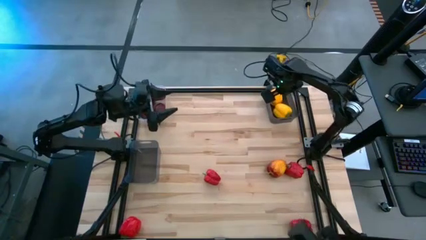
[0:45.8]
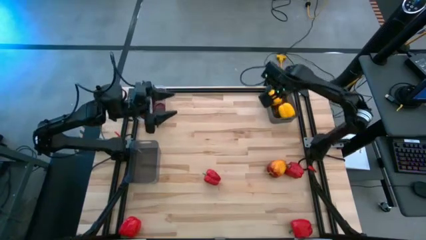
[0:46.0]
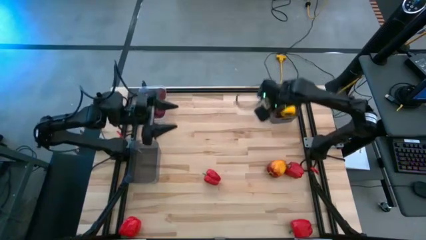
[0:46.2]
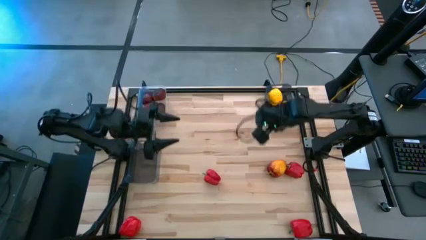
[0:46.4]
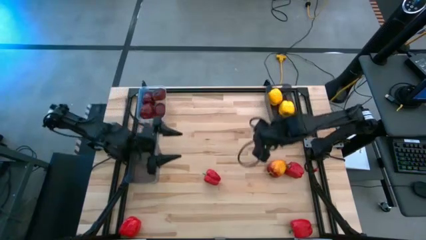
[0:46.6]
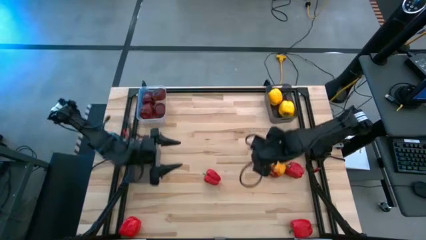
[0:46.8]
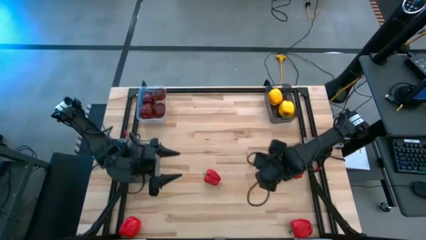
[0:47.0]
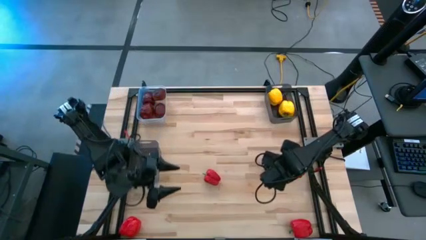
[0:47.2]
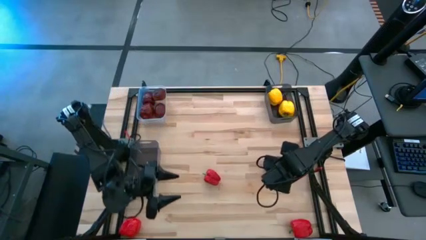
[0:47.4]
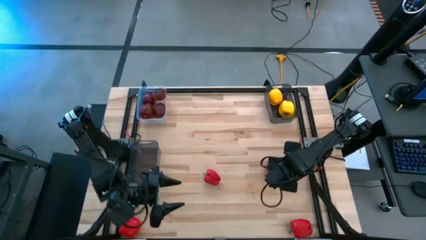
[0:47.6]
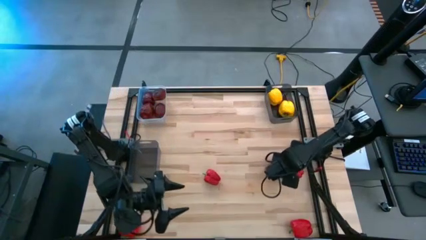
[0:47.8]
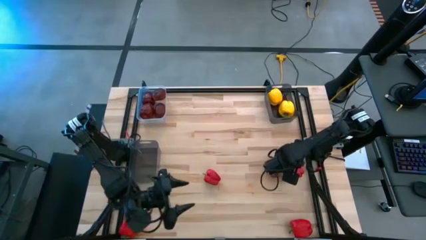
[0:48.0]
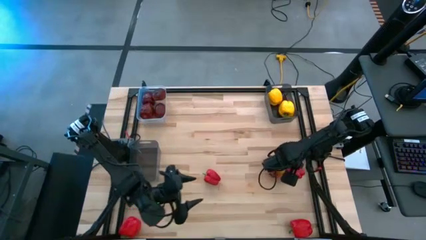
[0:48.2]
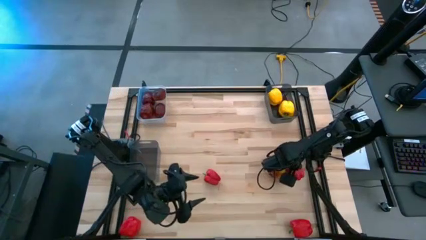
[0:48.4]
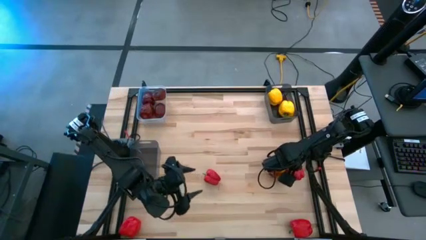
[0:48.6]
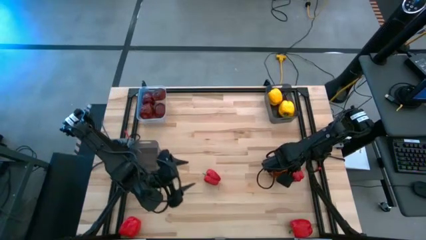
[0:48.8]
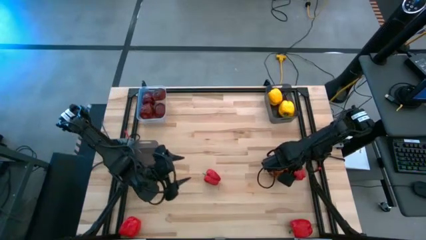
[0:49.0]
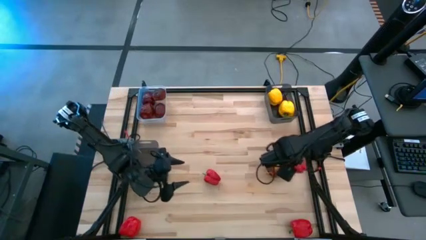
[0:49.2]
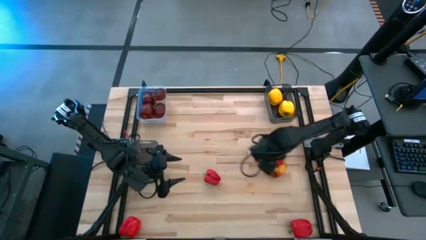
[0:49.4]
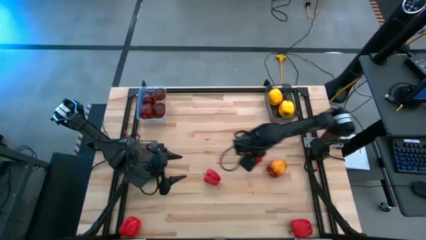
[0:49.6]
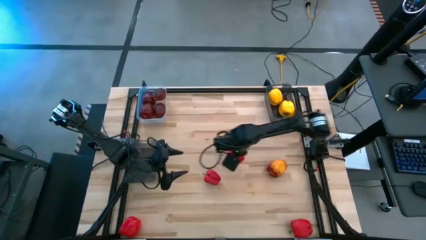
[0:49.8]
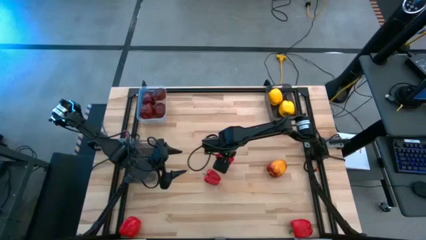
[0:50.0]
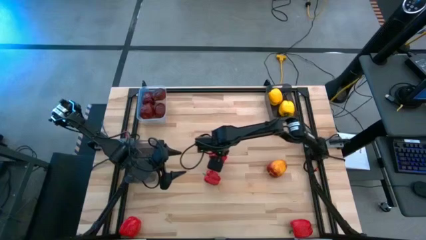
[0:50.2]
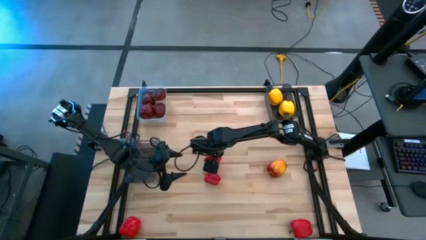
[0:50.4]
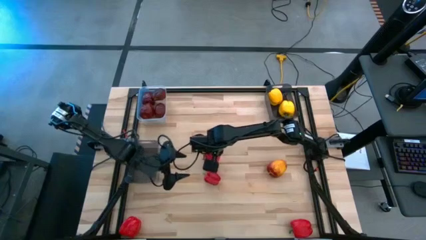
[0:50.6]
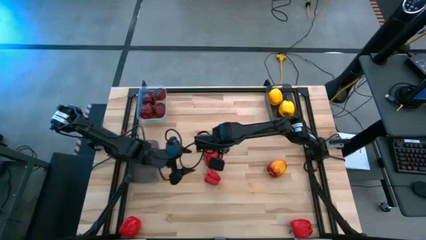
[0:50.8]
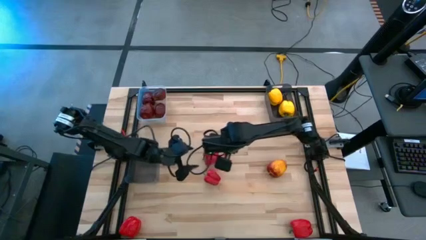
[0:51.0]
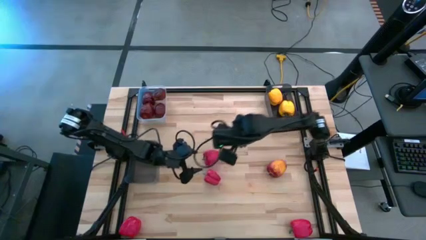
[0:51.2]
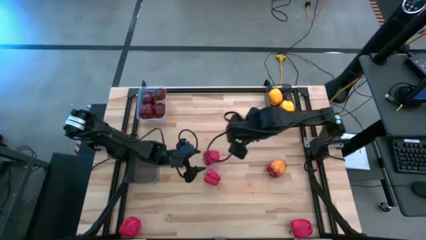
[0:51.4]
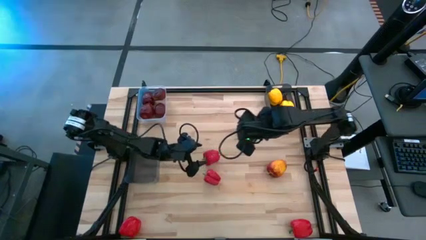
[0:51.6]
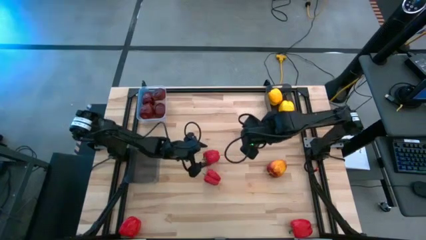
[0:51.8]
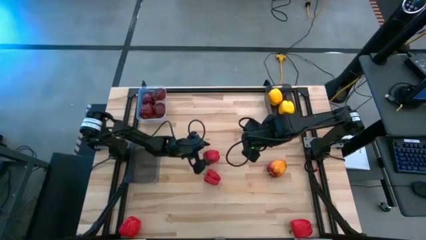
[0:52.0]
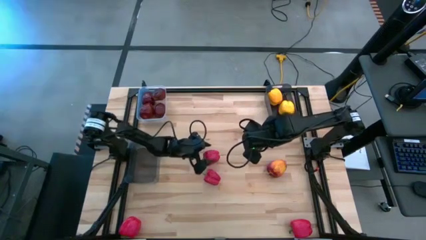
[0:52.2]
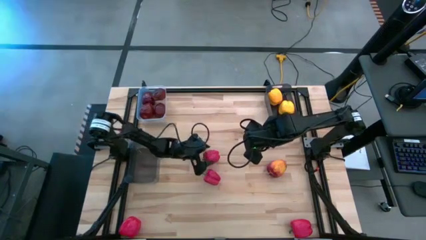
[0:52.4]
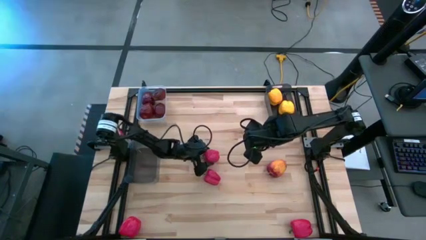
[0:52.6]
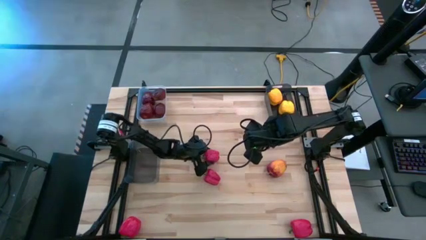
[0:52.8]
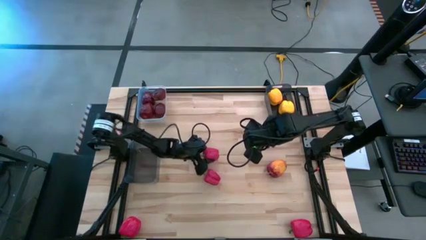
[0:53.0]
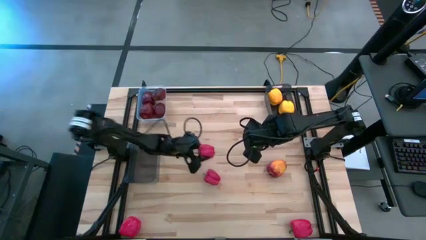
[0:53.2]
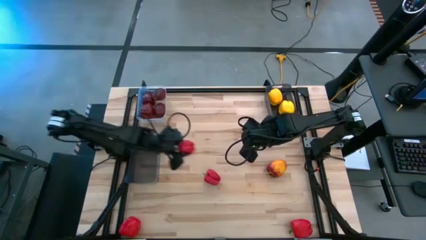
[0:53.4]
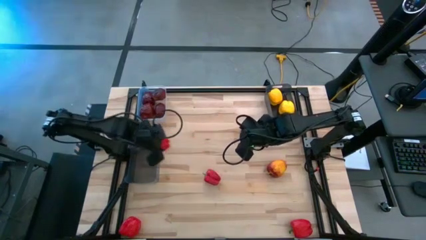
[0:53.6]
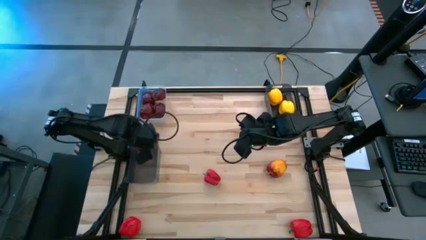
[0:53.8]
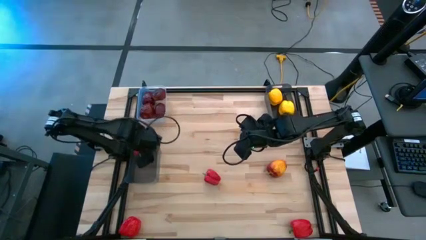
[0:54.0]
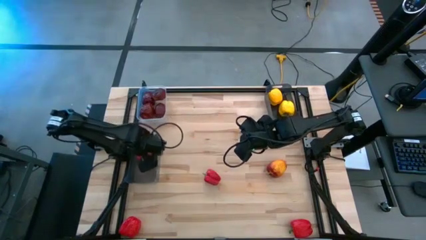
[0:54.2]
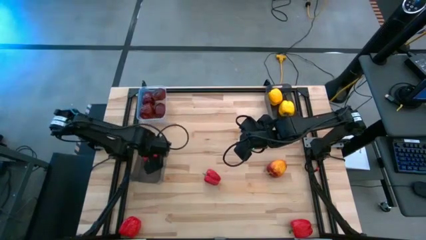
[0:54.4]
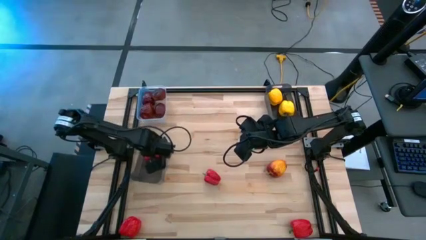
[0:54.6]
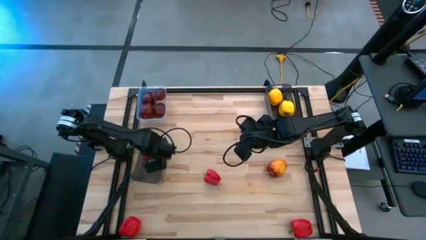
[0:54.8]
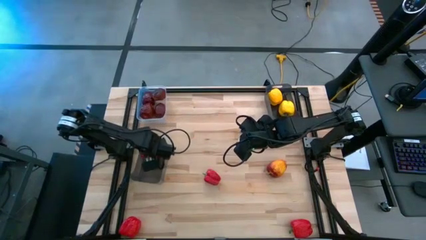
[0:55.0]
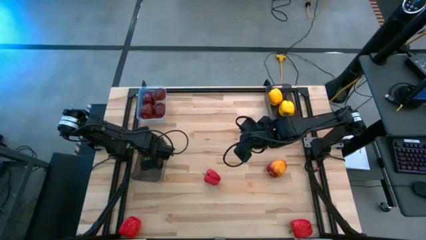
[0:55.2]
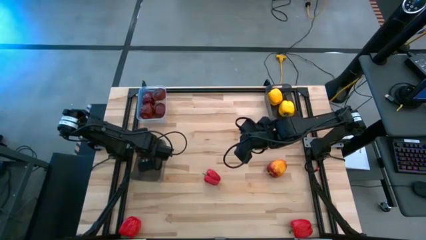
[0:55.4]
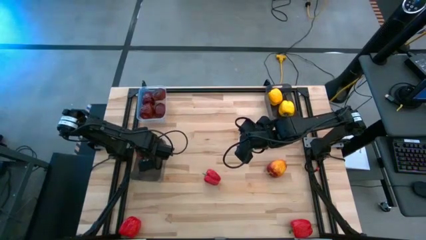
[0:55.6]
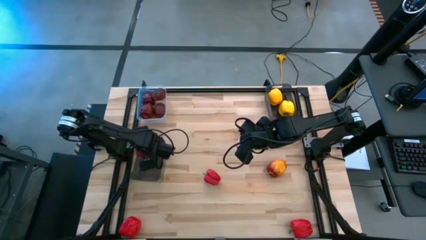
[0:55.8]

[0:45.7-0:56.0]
Task: Sort produce into baskets
Put the red bell pepper into the bottom black bin

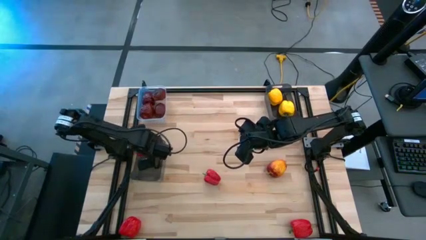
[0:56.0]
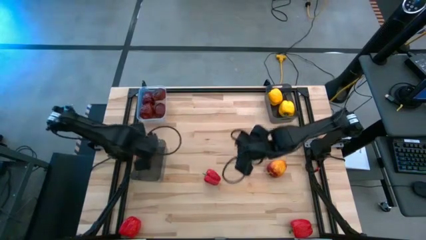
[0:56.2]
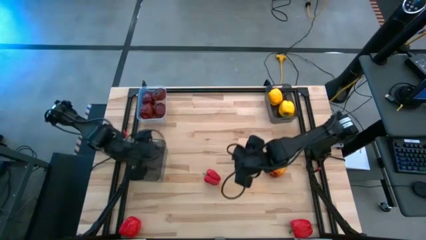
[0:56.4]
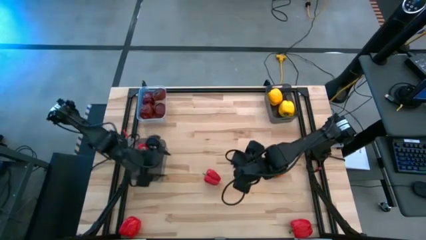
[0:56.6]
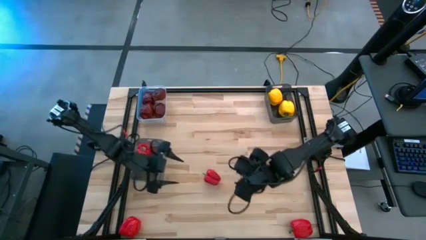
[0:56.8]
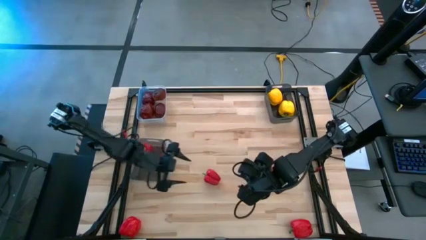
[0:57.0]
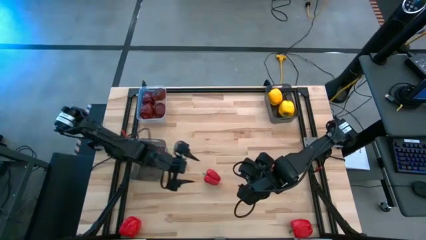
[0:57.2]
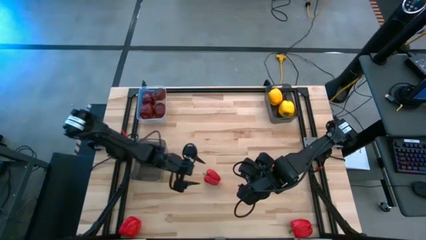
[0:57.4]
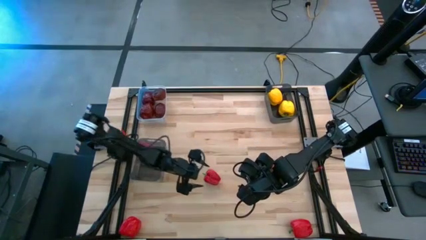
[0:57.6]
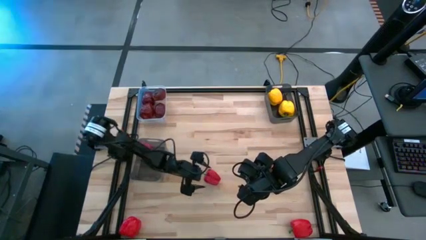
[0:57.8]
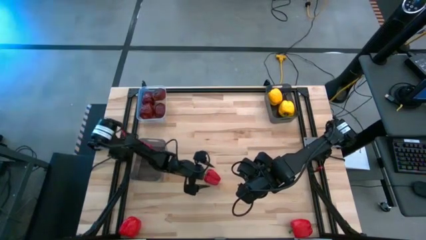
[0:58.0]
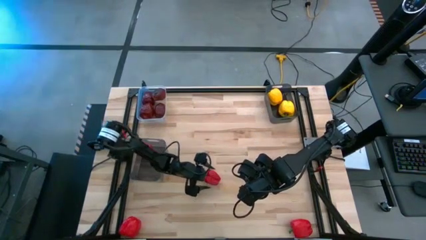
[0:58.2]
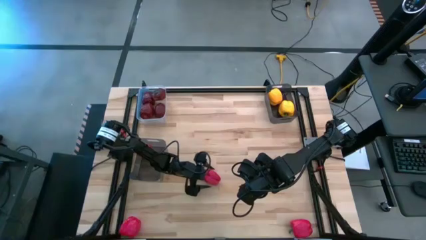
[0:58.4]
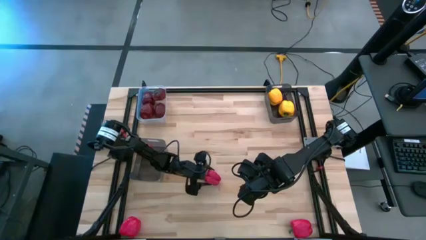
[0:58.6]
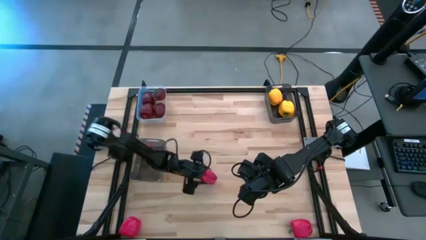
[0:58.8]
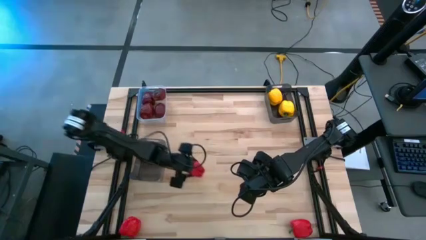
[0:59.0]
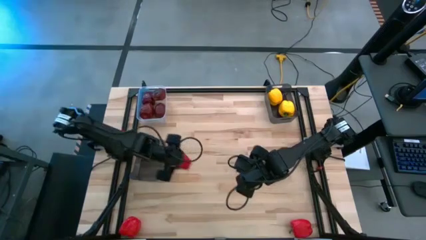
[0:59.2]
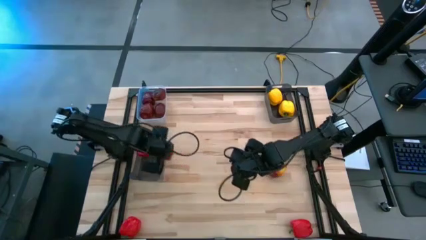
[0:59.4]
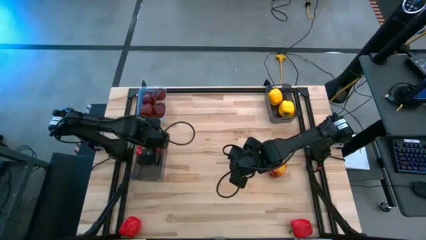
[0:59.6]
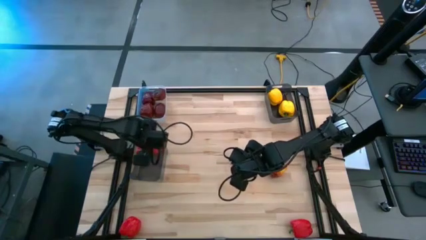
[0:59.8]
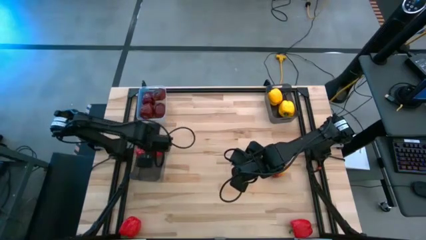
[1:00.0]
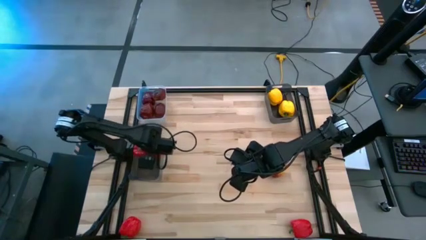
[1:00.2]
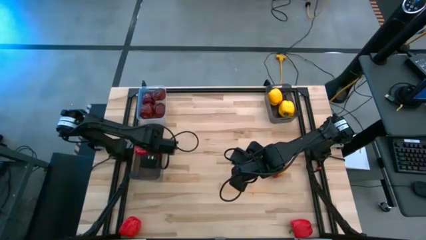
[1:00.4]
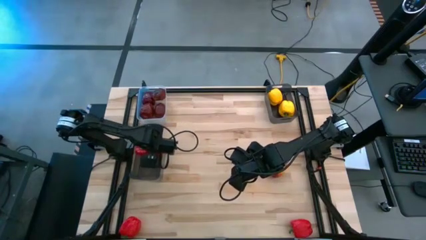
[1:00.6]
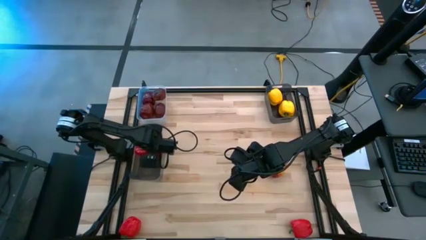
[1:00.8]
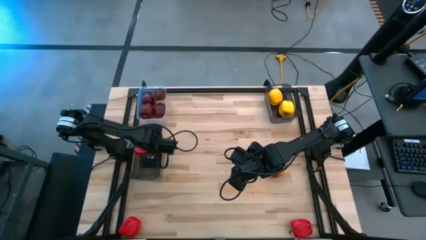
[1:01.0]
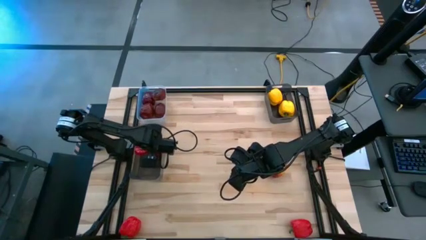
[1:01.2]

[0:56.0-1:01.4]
Put the red bell pepper into the bottom black bin

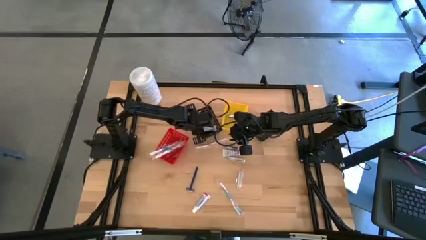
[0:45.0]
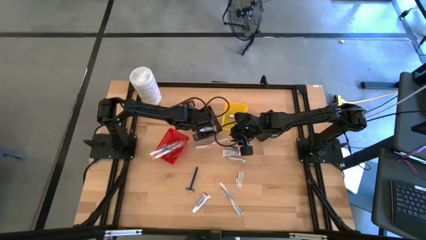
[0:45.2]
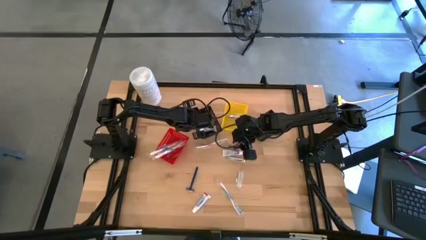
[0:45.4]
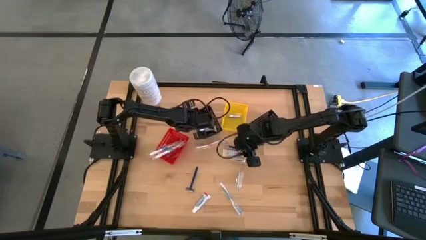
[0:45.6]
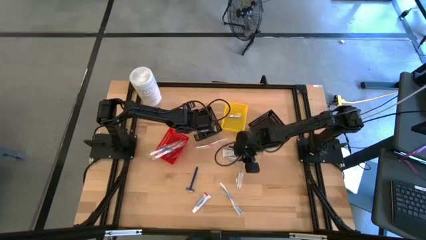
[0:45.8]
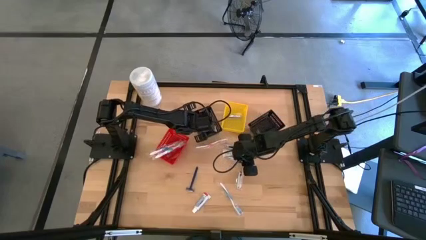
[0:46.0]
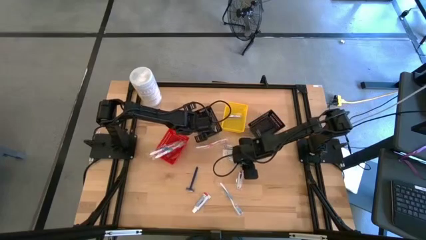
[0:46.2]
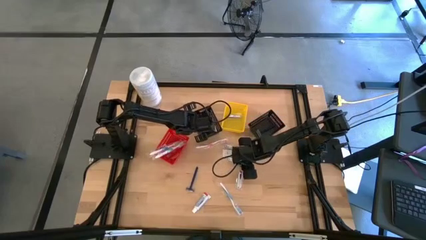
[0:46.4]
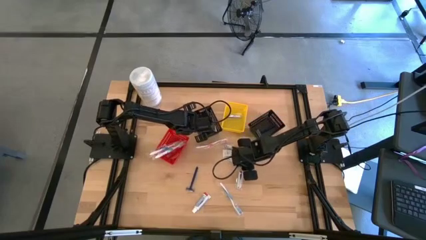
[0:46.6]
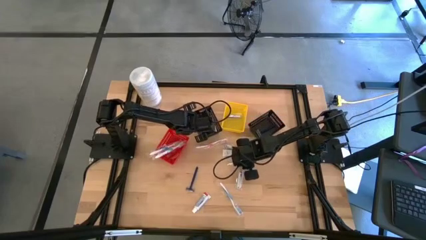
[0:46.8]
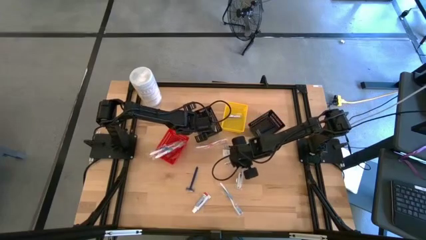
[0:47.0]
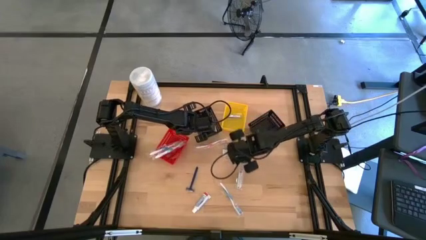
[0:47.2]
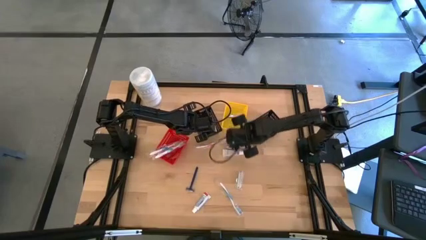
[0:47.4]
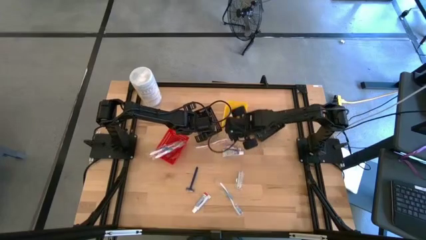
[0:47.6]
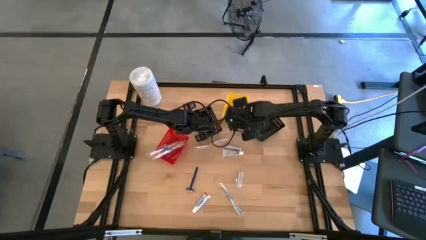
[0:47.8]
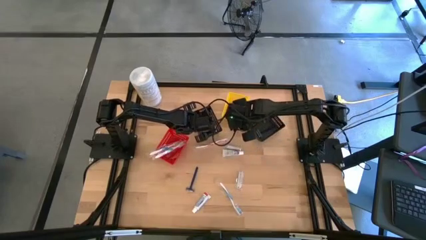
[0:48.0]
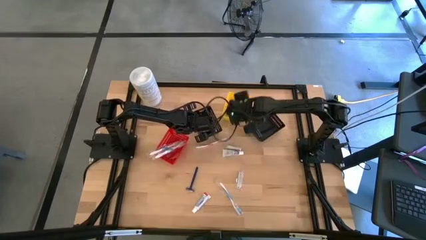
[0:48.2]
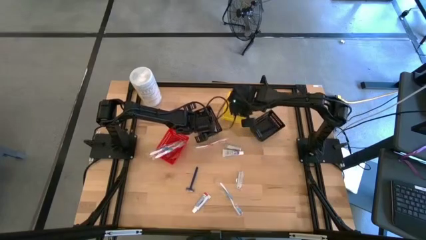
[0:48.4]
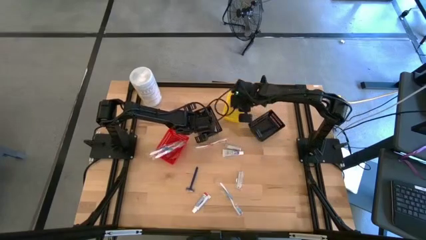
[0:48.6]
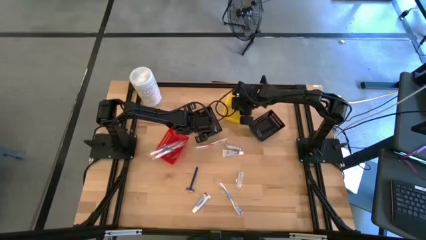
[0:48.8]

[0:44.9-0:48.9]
Task: Pick & Place Travel size toiletries
Put the nail cutter into the yellow bin
